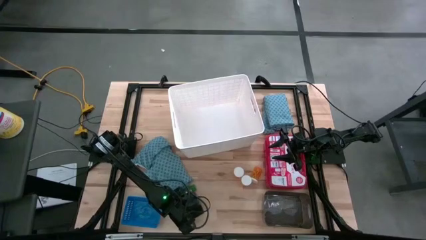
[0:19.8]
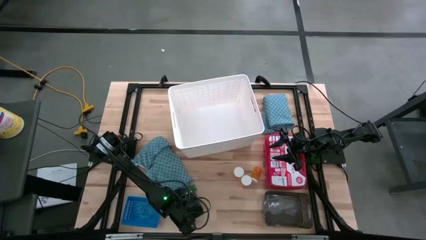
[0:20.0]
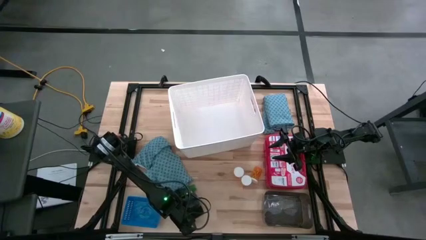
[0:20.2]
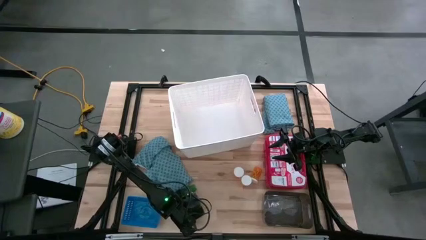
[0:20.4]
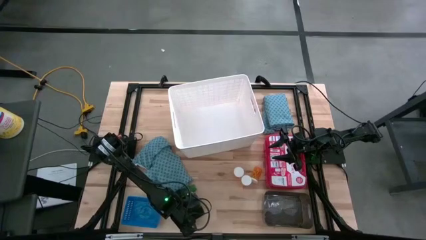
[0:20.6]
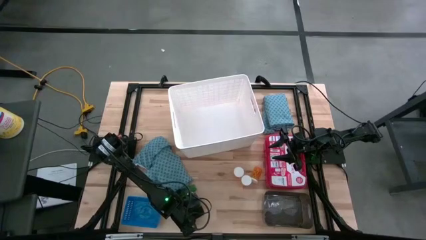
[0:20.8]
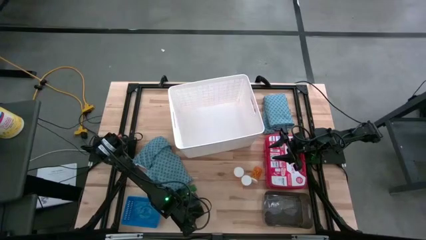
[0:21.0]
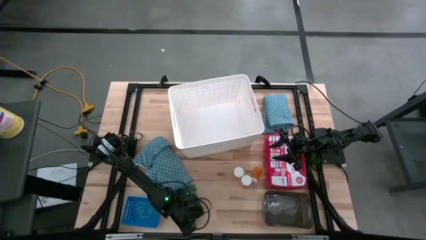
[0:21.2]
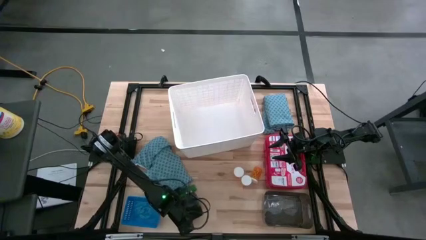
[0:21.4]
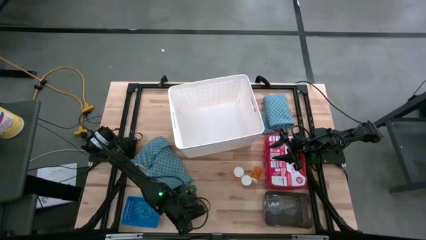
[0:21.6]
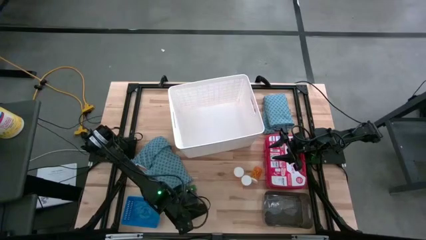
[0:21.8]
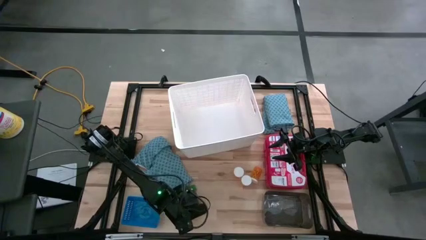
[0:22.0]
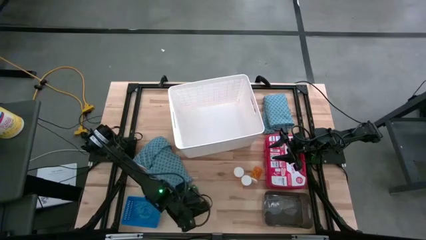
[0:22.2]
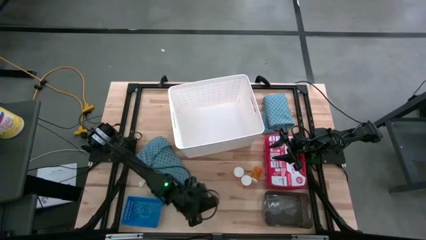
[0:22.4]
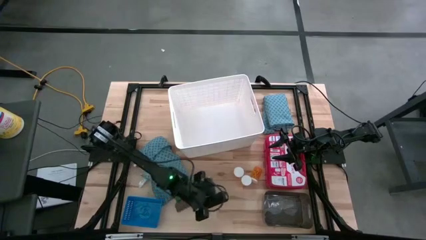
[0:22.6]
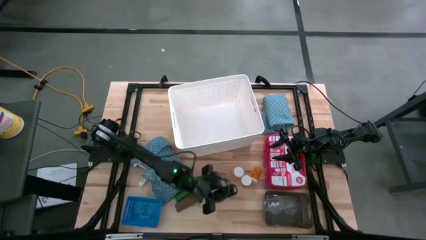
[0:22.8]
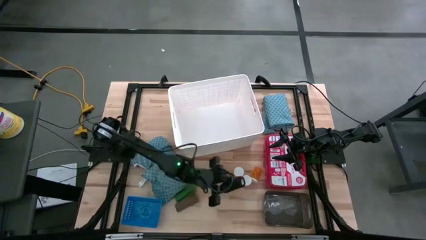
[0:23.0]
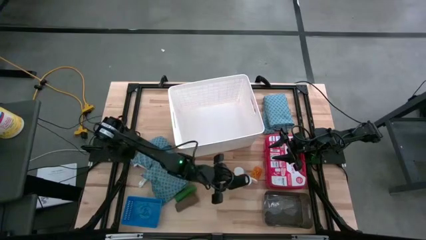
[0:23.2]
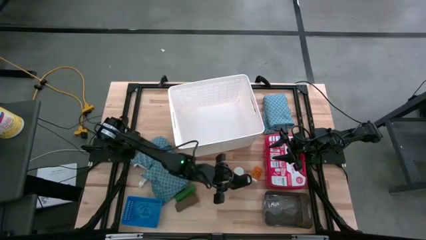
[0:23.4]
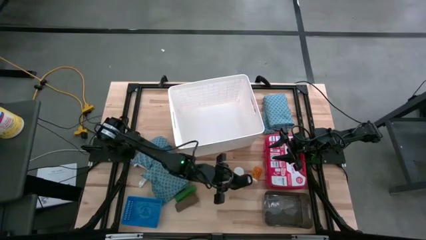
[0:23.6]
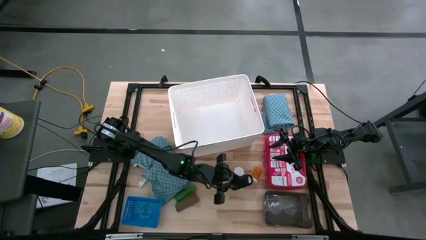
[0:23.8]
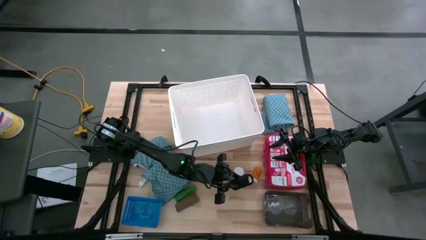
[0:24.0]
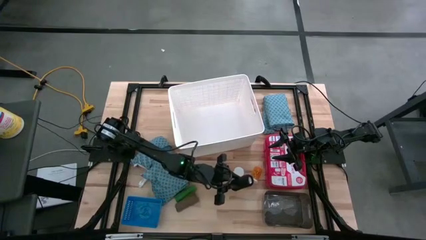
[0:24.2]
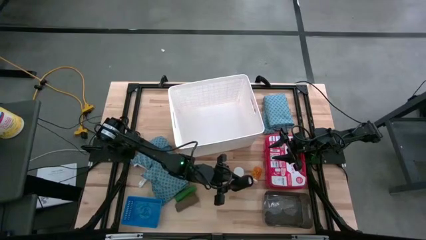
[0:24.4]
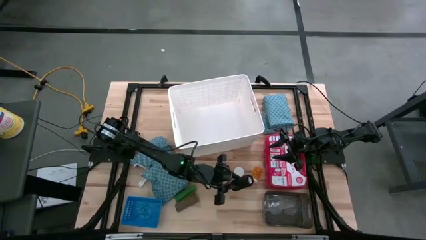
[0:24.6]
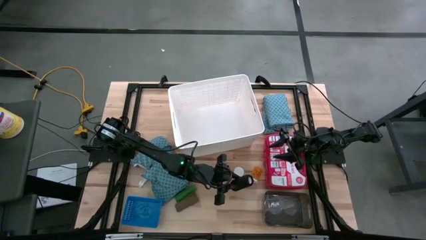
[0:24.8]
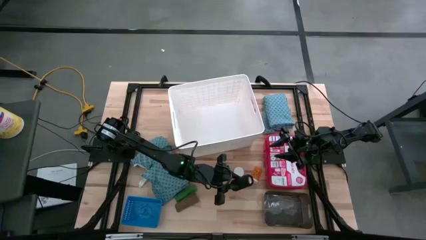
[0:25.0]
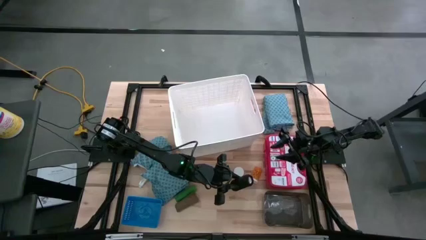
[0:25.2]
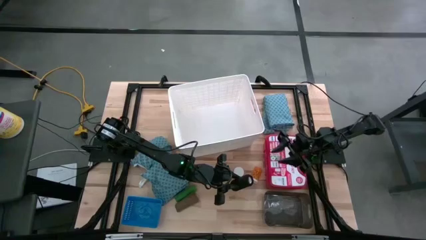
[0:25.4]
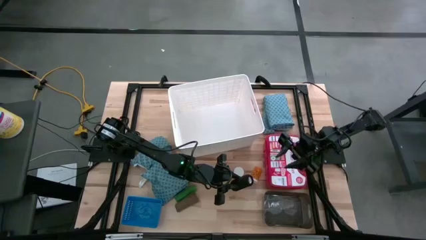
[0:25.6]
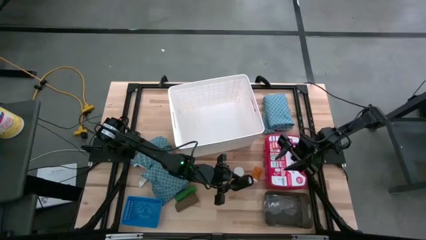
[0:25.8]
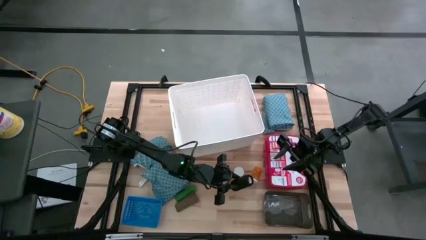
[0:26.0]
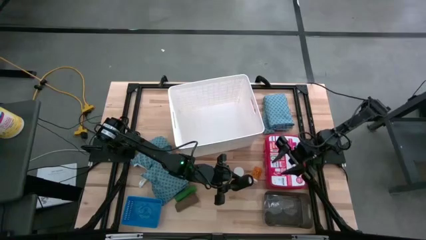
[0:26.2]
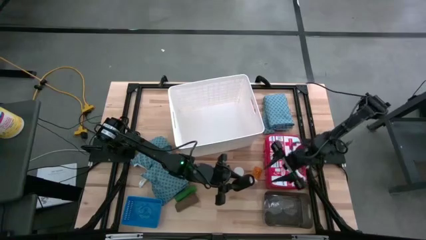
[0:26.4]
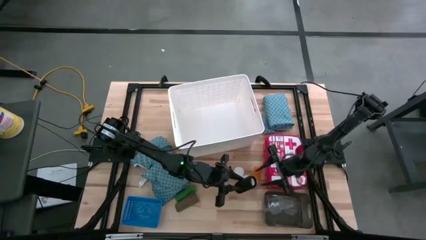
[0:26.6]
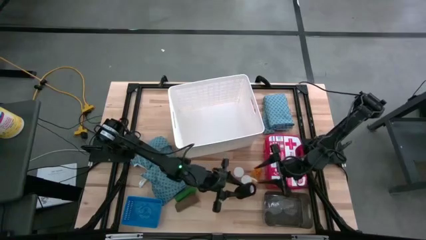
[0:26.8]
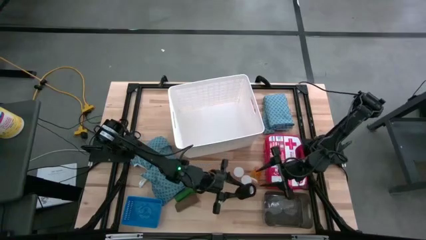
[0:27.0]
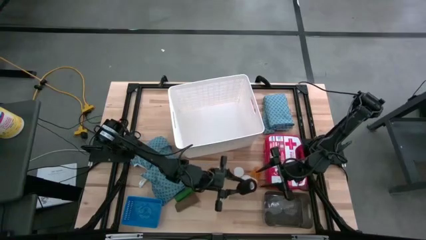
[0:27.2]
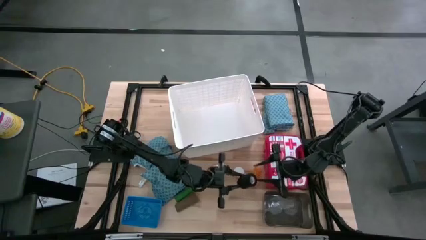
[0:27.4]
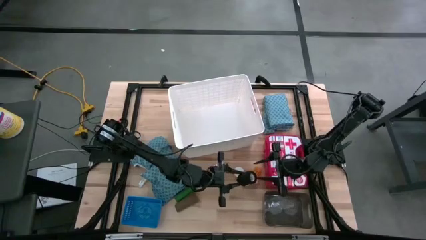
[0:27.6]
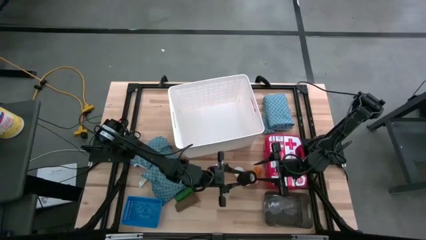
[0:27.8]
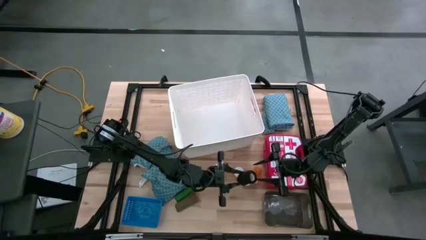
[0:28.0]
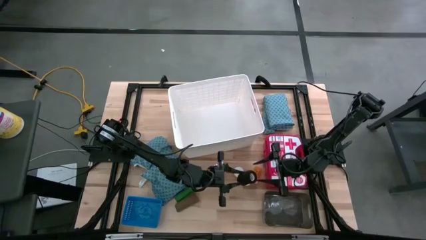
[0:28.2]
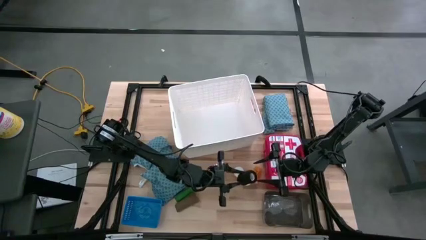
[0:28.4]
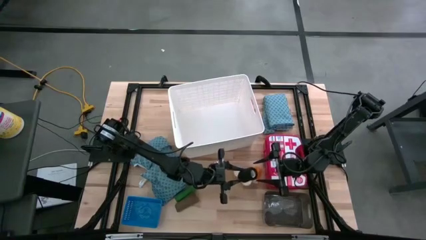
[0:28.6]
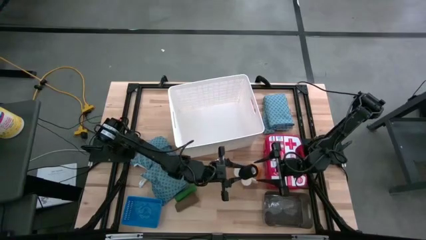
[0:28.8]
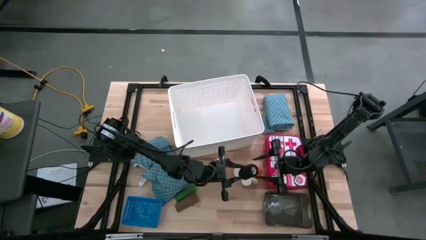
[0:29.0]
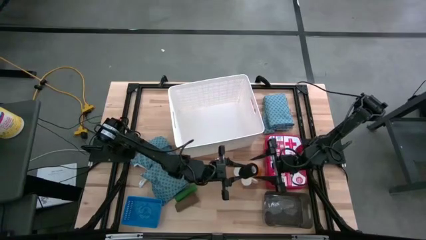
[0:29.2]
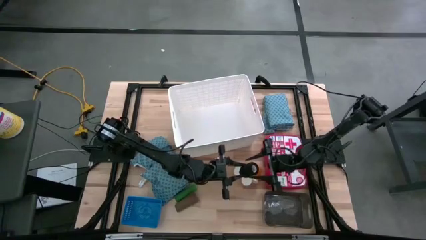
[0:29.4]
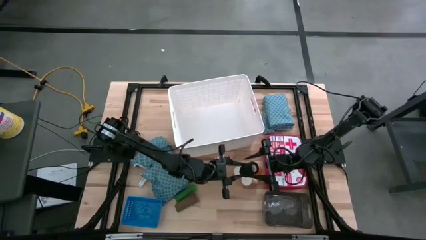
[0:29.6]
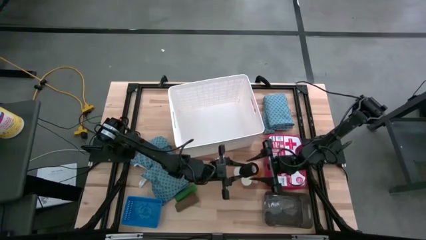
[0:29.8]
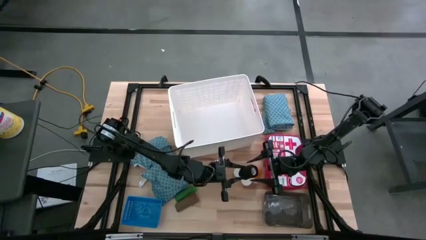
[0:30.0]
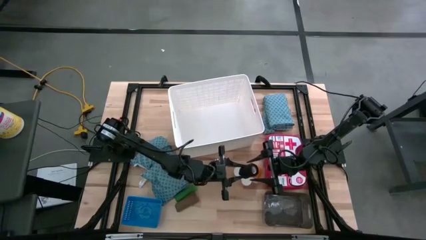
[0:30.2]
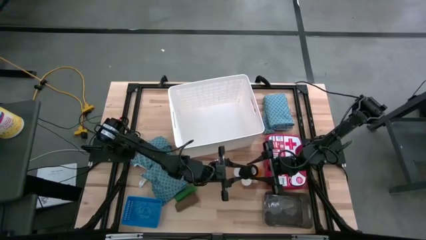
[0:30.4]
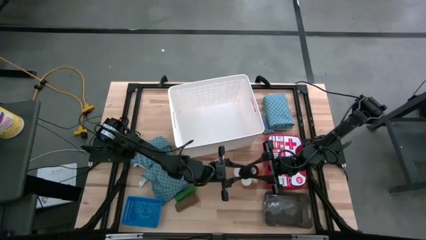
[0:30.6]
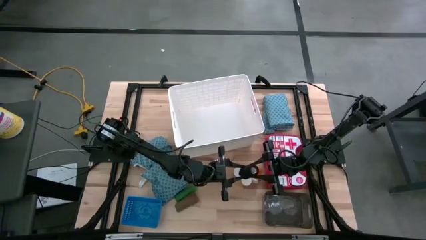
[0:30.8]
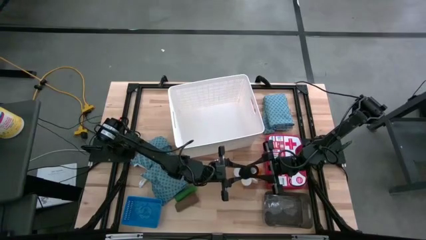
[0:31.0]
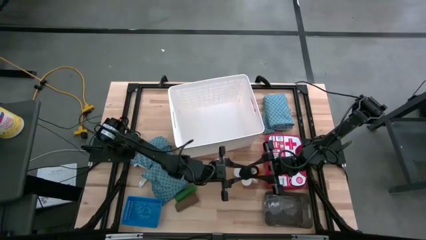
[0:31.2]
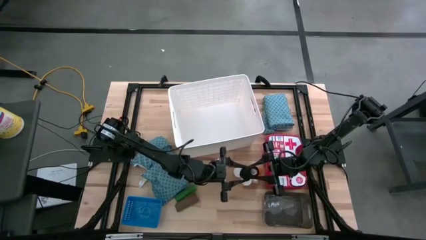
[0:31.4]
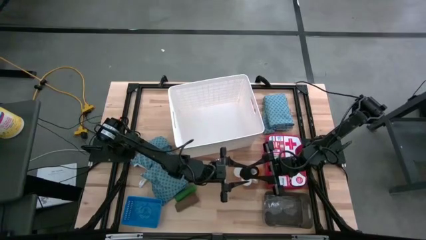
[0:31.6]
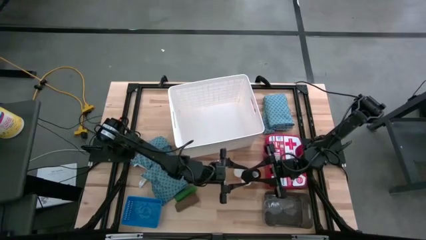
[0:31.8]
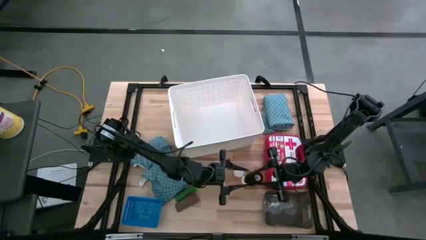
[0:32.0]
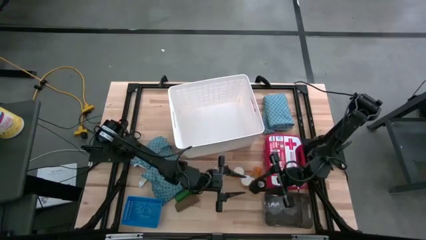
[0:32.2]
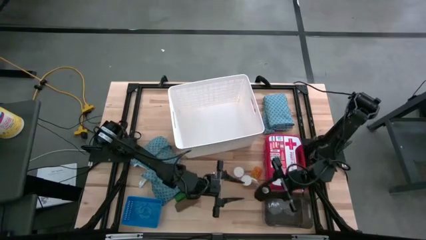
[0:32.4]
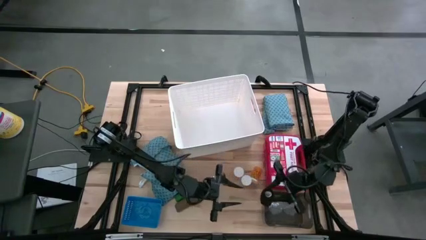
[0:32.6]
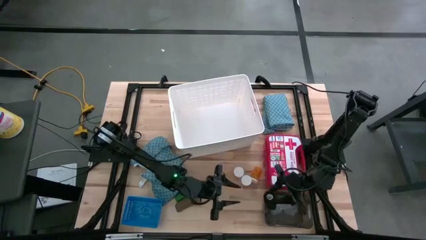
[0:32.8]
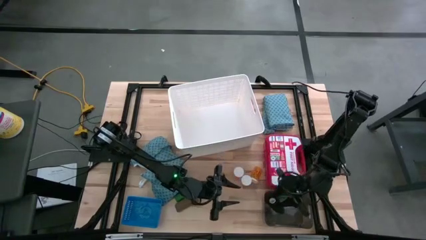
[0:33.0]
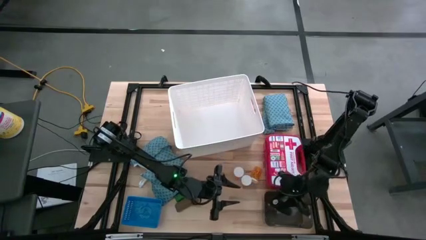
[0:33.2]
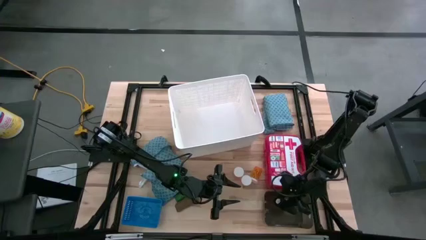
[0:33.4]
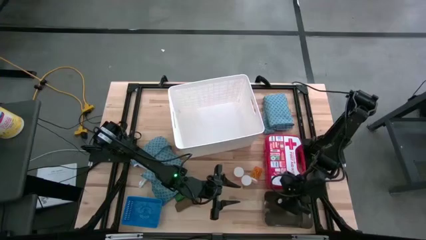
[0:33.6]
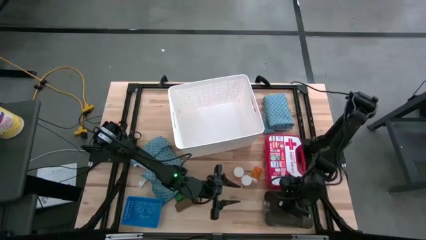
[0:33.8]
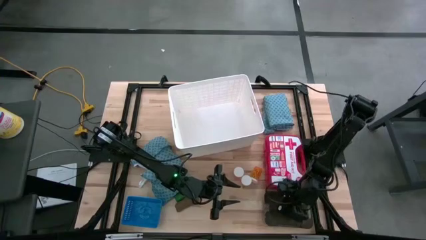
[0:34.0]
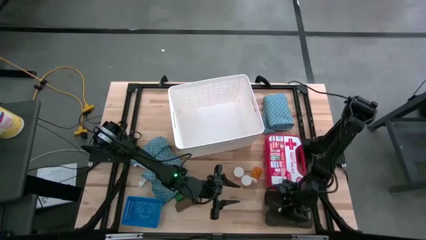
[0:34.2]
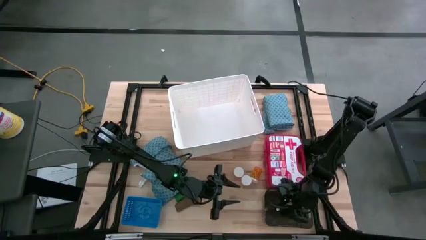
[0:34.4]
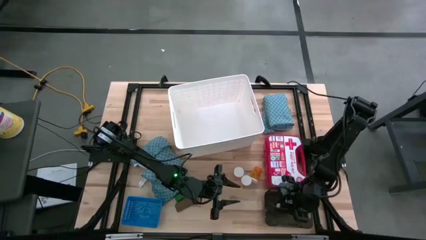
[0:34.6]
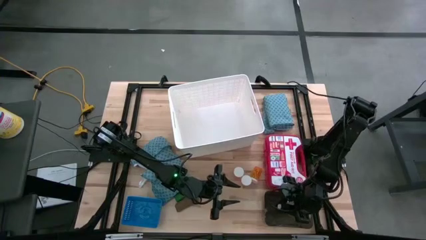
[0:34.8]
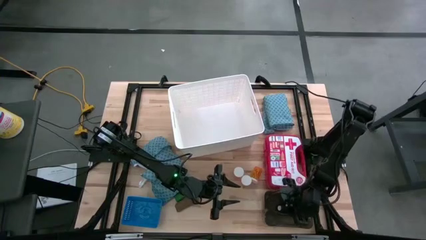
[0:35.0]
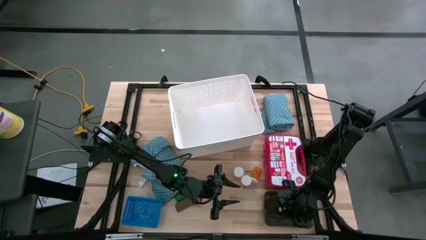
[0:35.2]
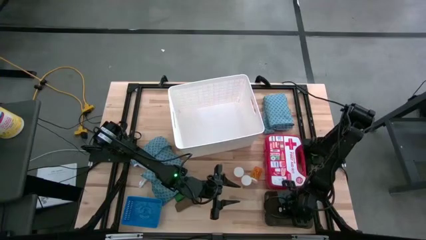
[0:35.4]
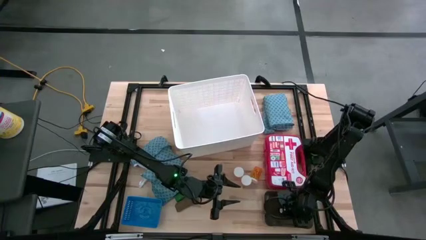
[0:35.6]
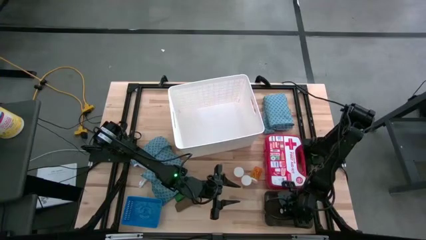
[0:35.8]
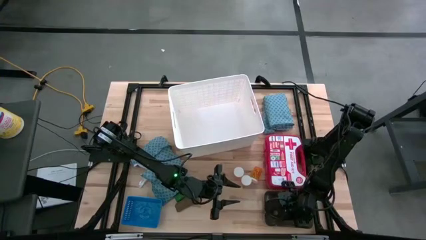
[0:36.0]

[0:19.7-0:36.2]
Task: Pick & place medical supplies in basket/bin
Put the black bandage into the black bin
